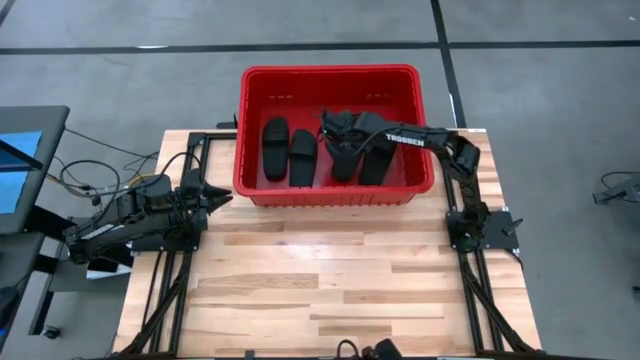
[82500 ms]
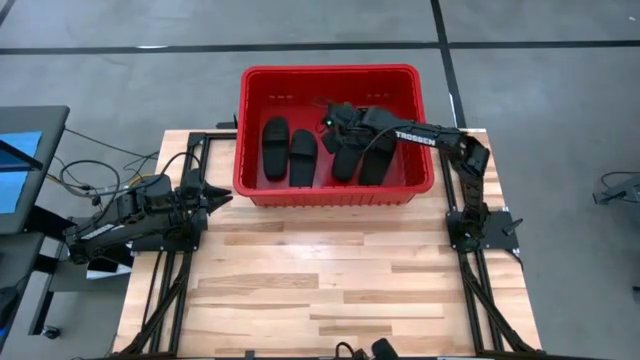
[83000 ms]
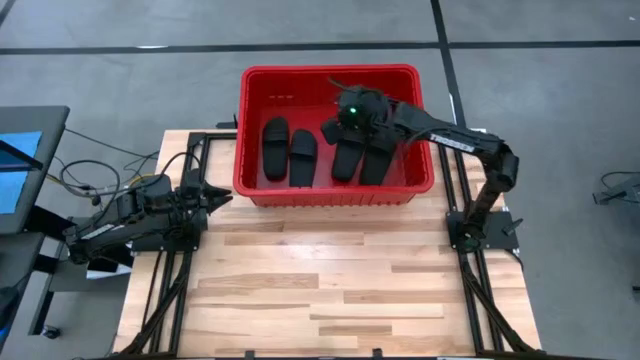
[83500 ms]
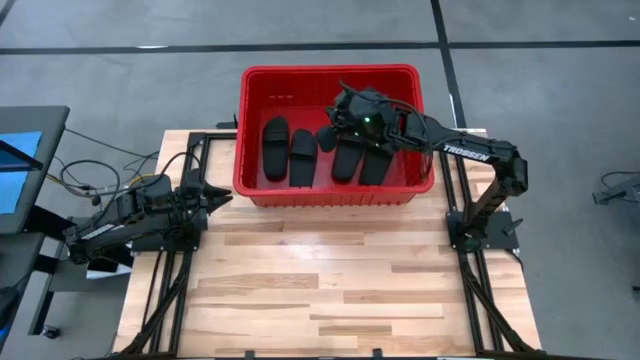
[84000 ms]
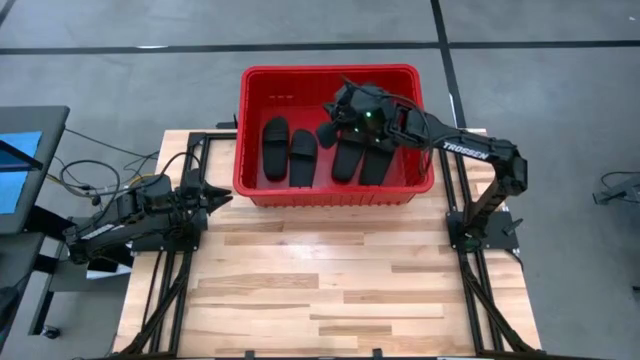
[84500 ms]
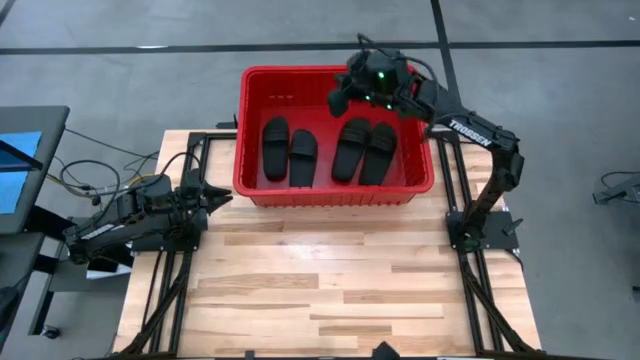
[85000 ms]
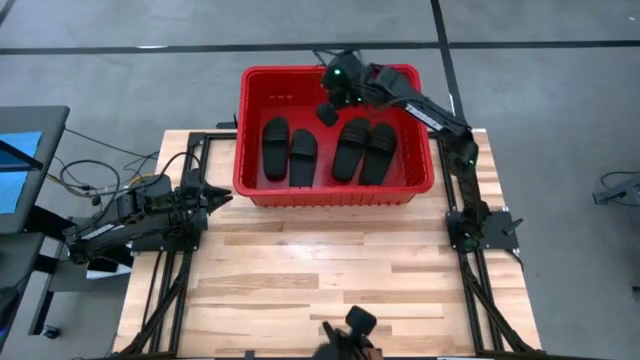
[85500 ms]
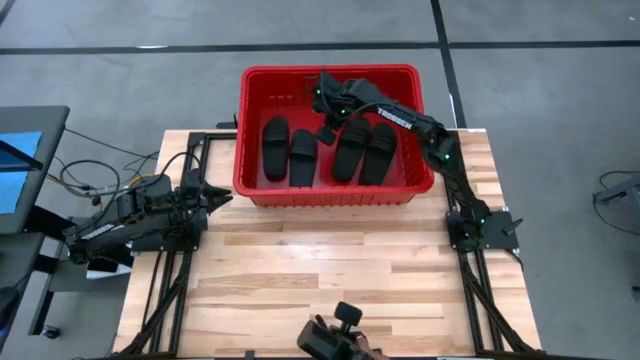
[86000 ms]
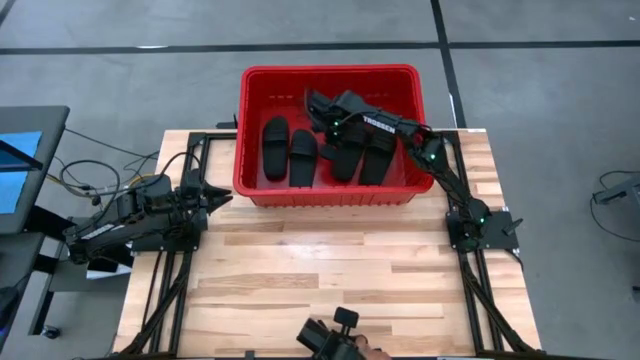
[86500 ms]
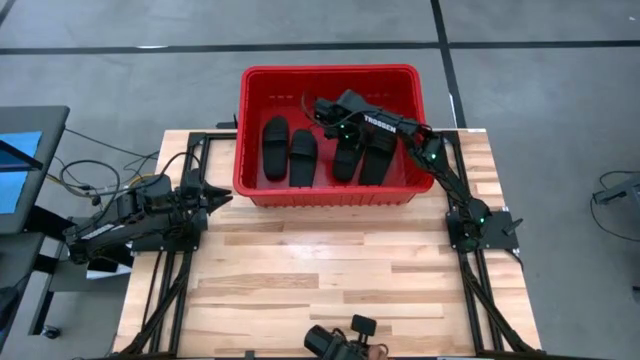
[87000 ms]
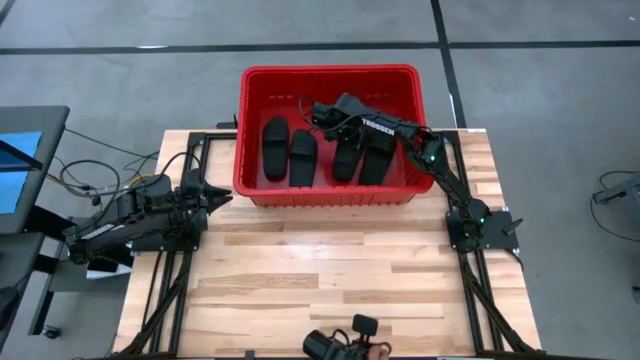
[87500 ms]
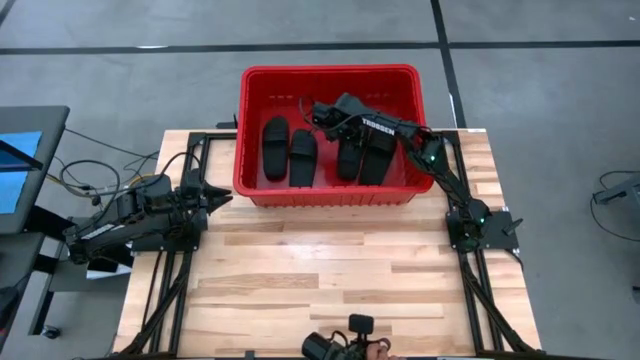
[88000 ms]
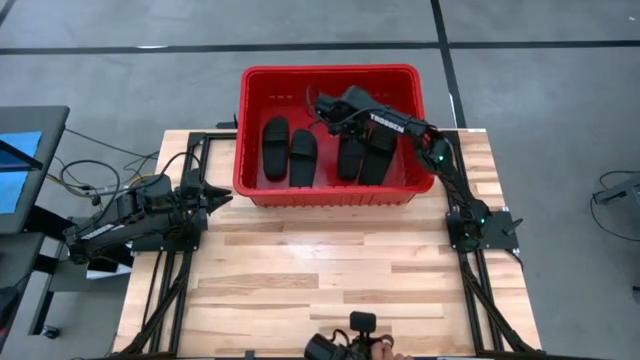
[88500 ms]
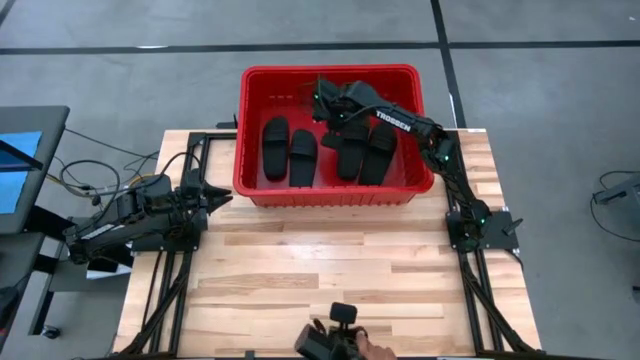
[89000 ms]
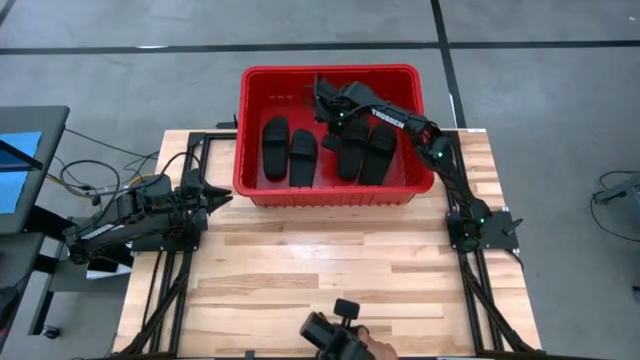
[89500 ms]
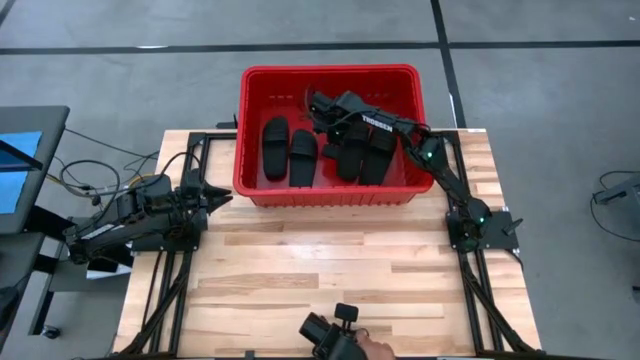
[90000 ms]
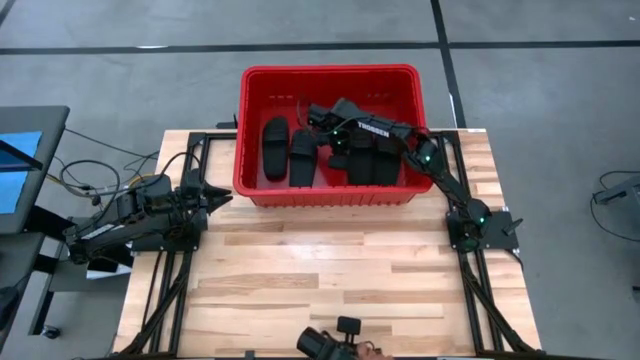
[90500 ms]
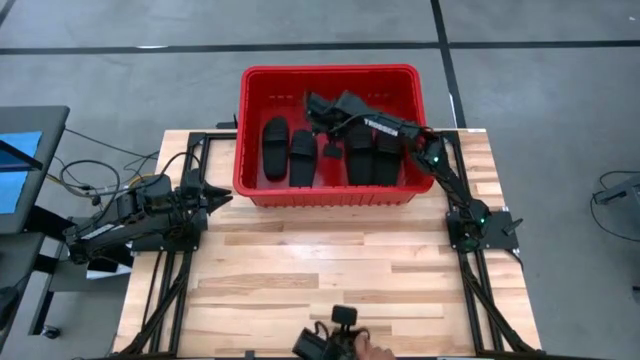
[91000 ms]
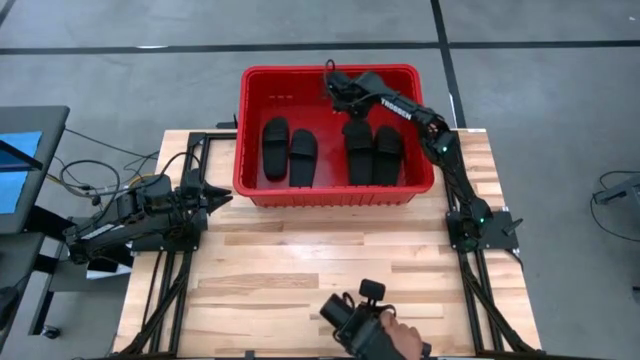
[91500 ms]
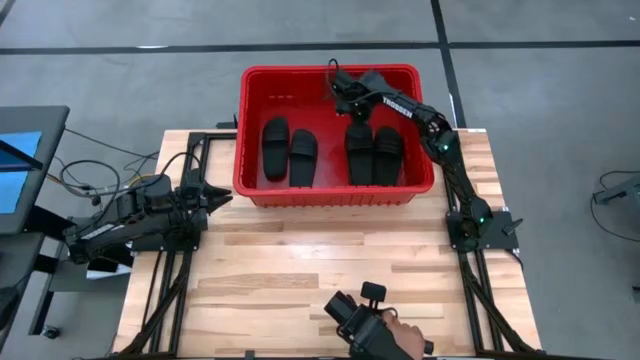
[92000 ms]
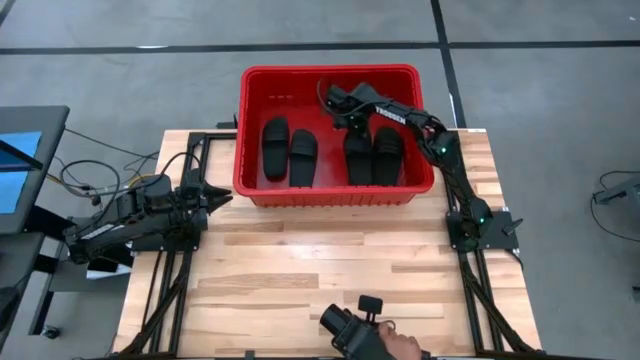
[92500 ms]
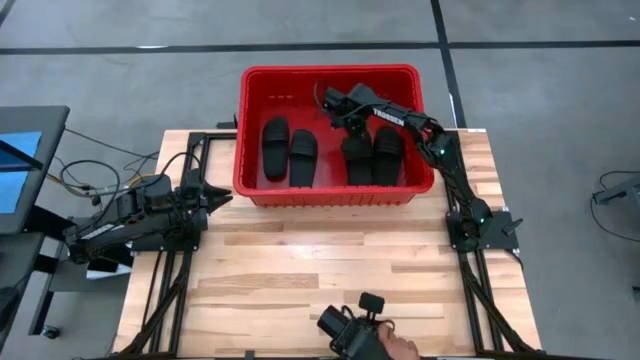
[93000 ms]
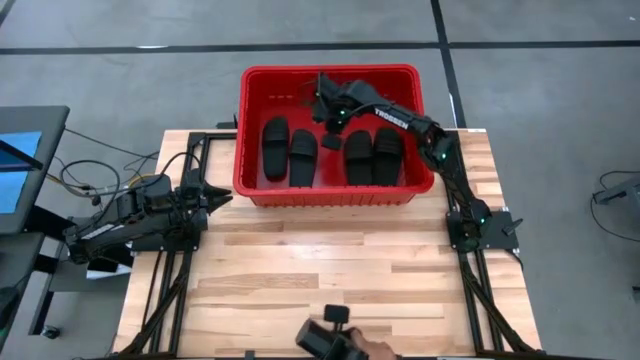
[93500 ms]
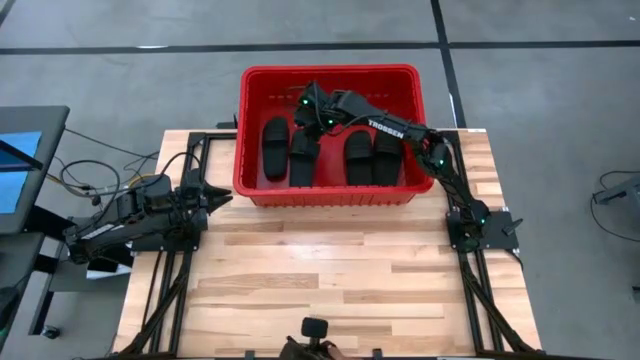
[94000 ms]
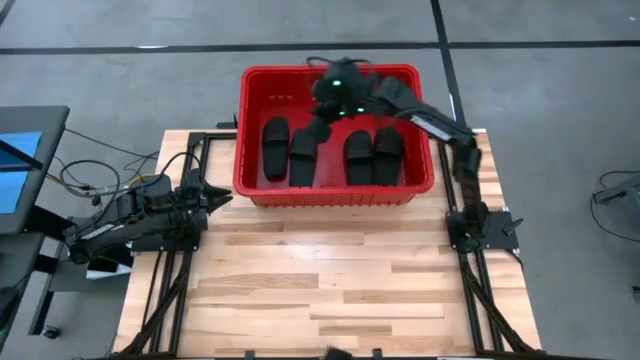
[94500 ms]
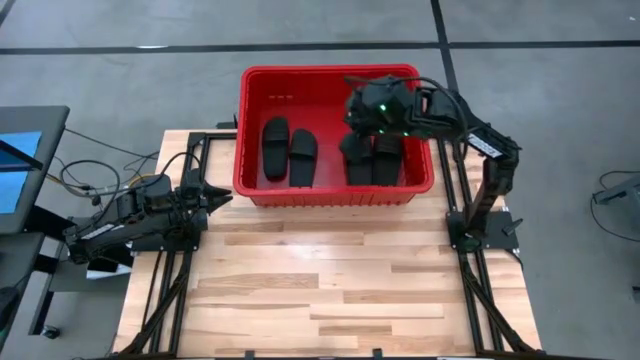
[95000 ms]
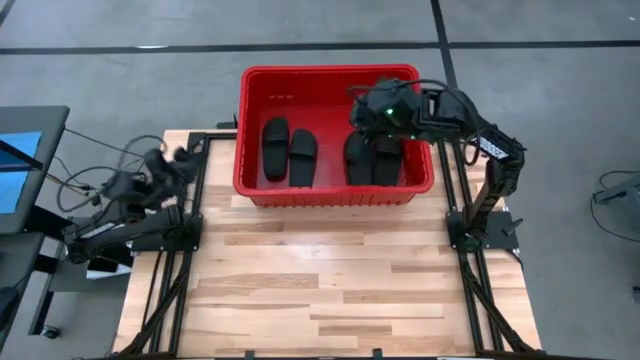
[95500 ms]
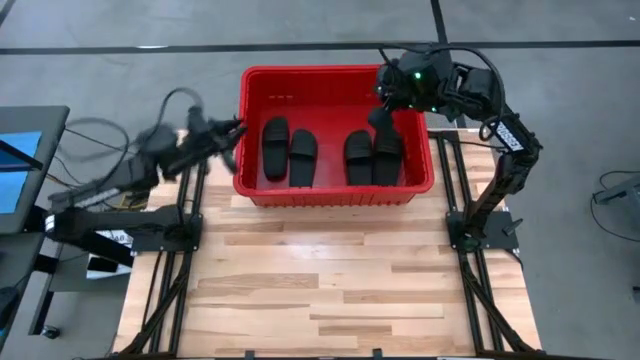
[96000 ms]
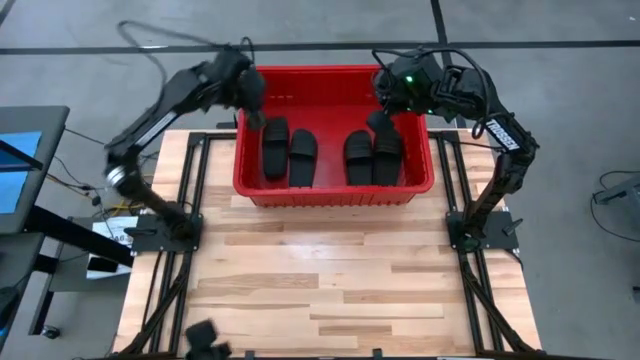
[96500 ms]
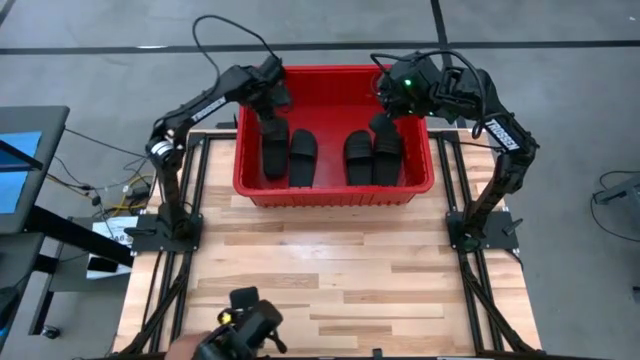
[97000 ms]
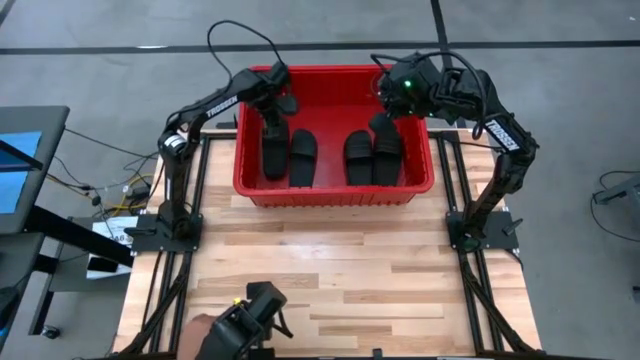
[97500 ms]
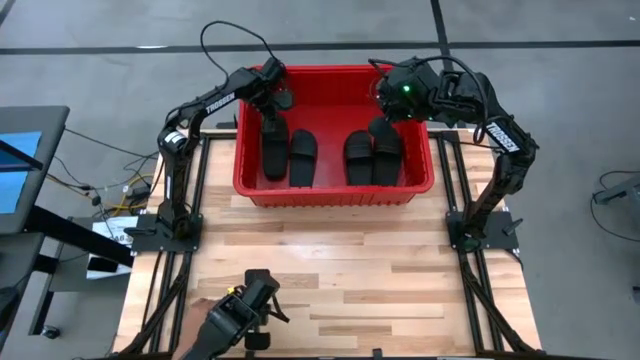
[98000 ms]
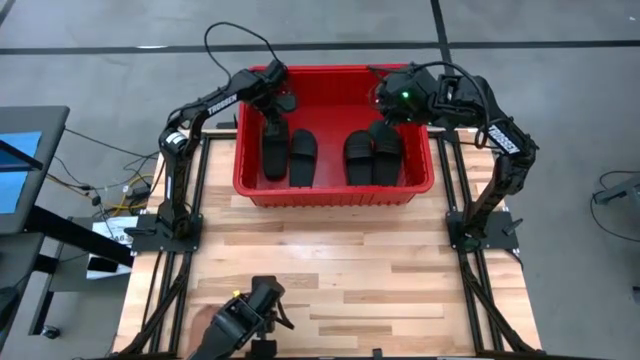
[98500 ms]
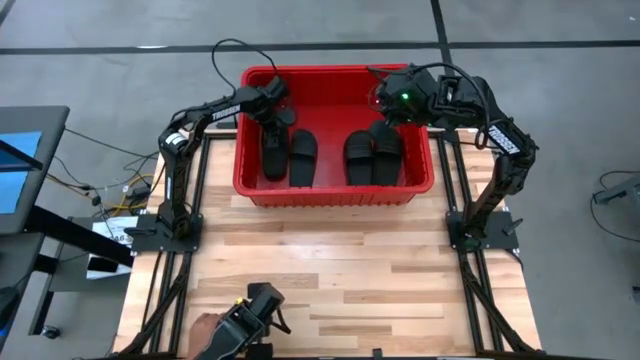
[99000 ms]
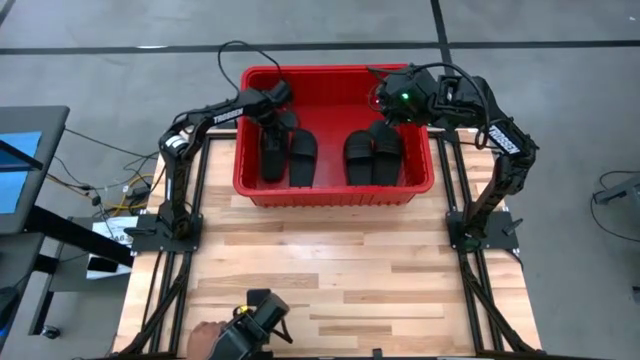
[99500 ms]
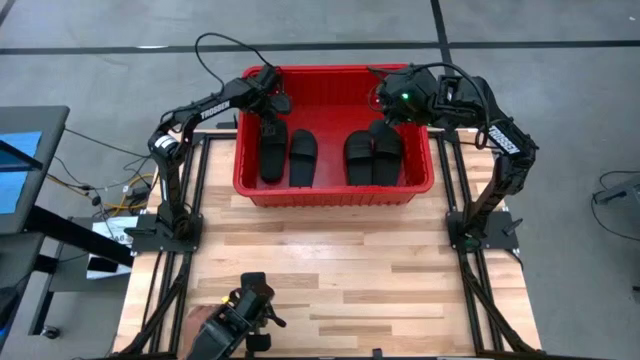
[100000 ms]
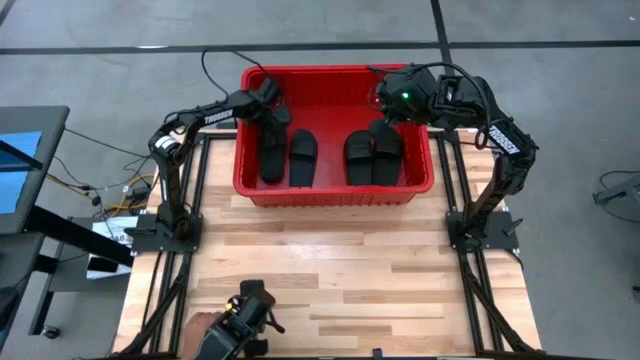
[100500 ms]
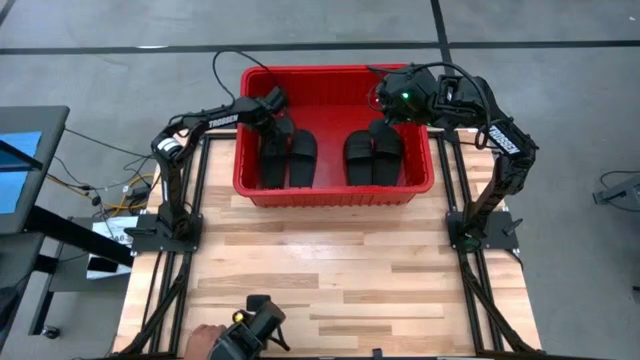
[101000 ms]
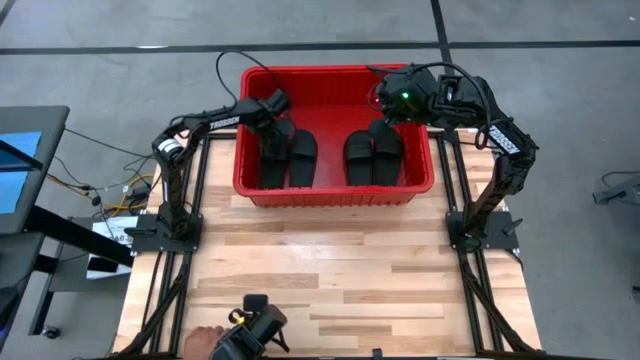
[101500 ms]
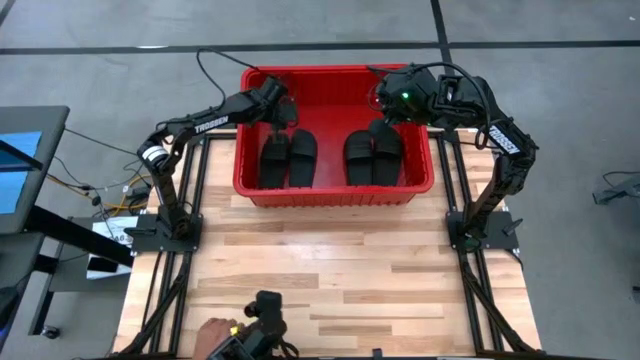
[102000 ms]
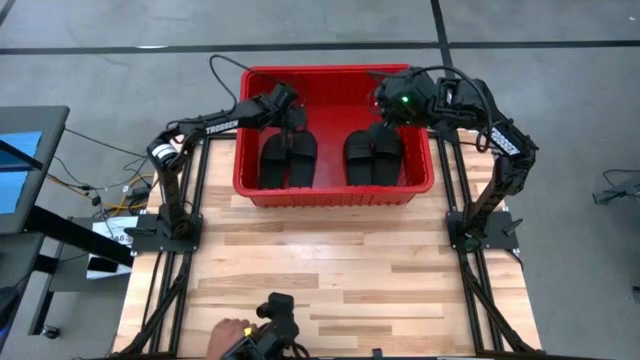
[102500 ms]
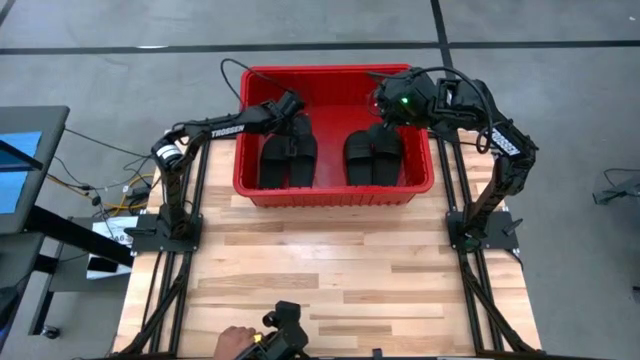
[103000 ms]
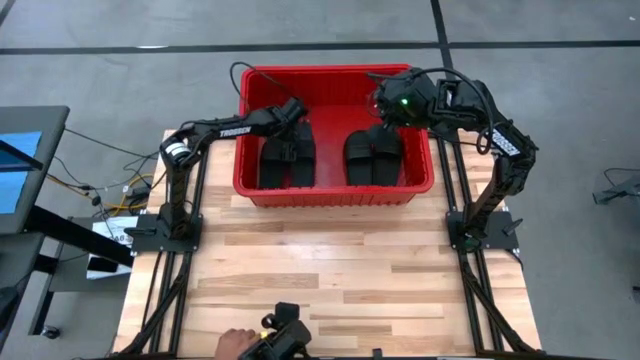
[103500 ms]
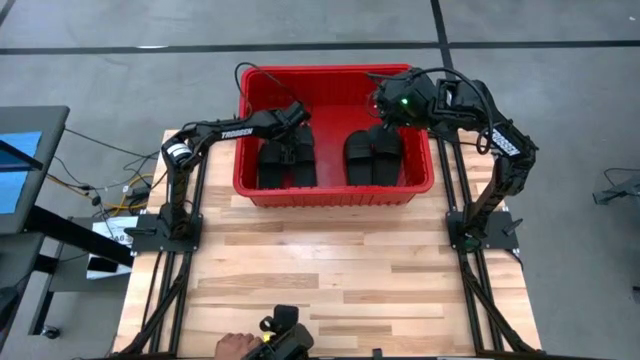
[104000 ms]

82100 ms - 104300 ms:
Task: Pick and place slides into bin
Adjust the slippers in the red bin
